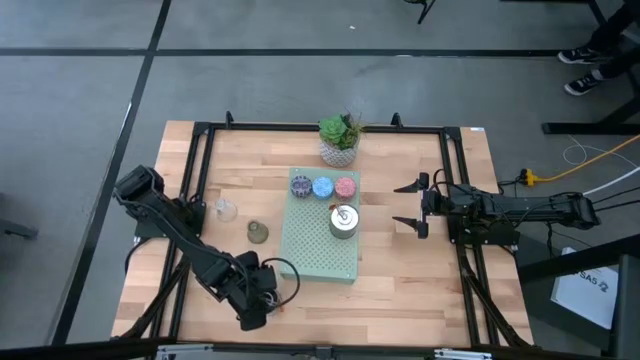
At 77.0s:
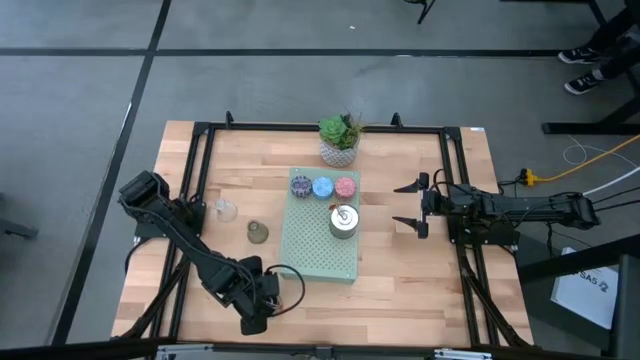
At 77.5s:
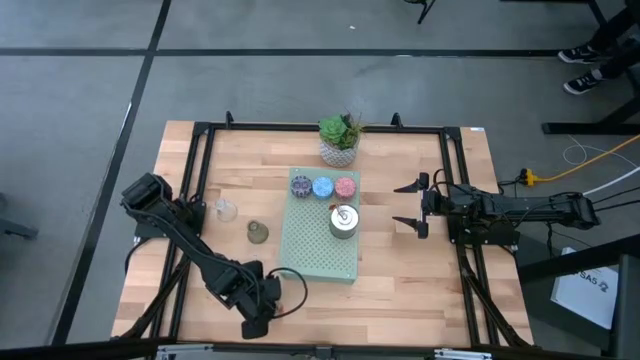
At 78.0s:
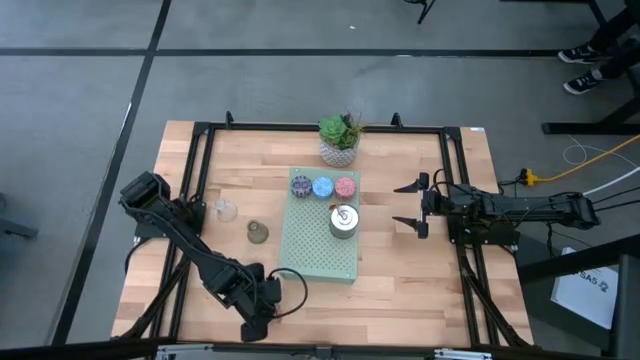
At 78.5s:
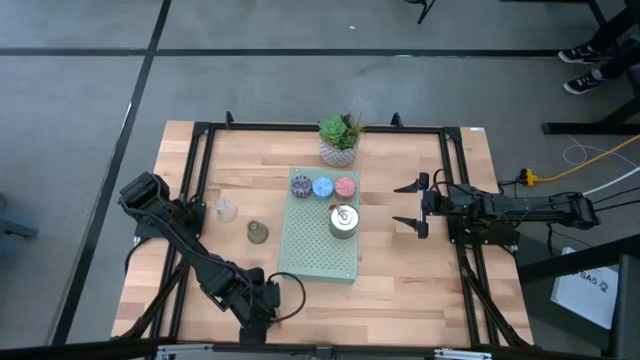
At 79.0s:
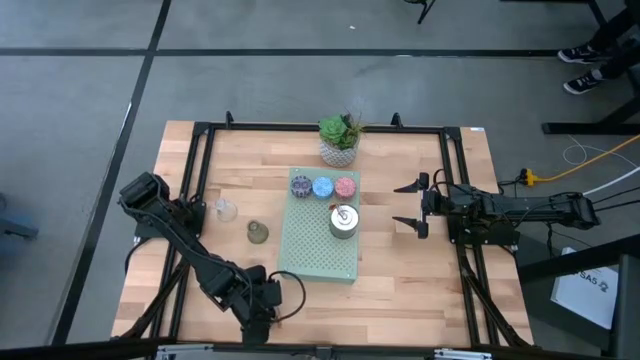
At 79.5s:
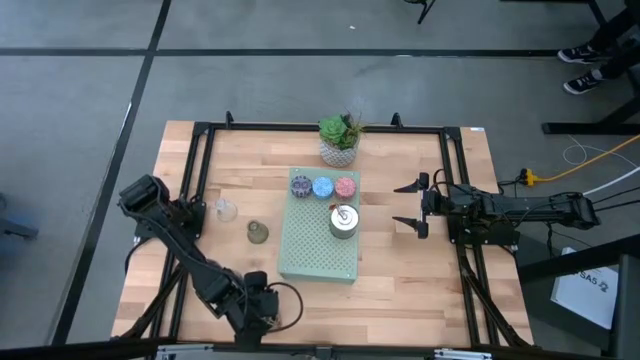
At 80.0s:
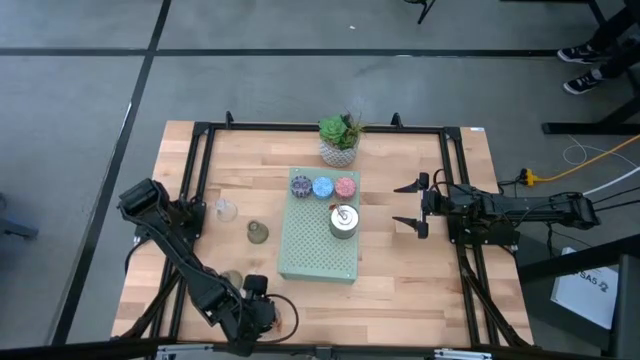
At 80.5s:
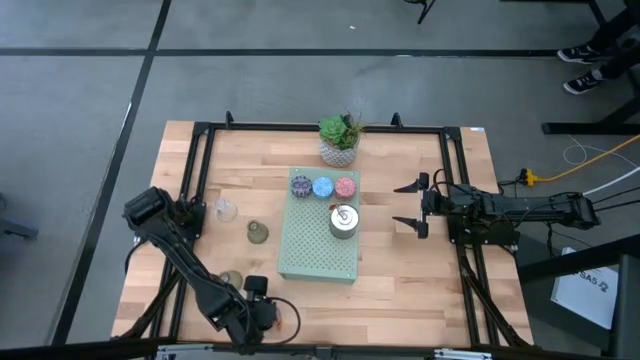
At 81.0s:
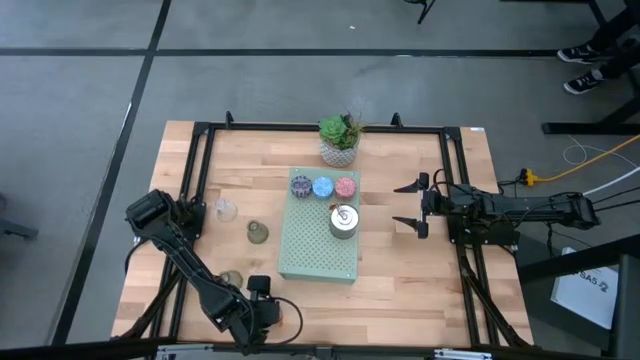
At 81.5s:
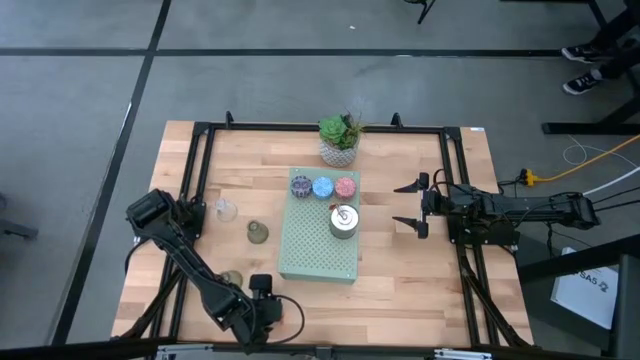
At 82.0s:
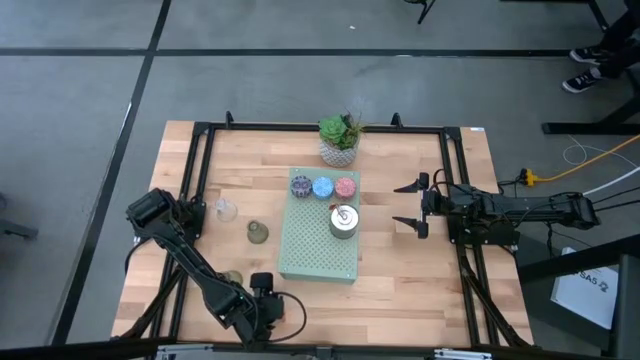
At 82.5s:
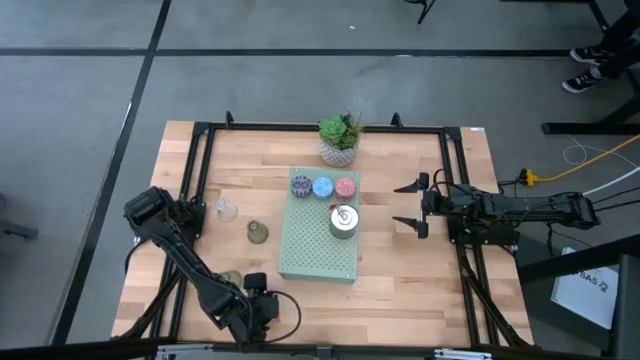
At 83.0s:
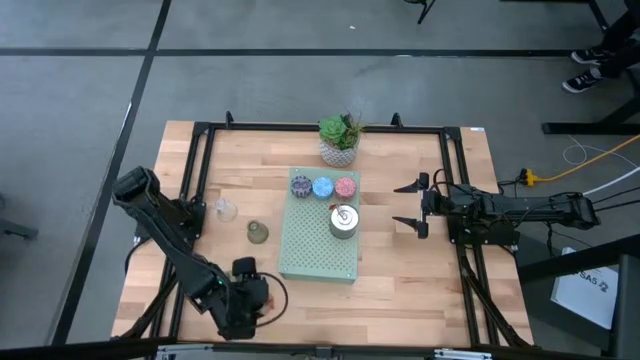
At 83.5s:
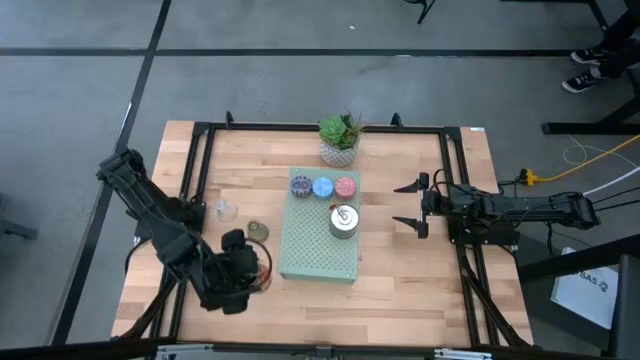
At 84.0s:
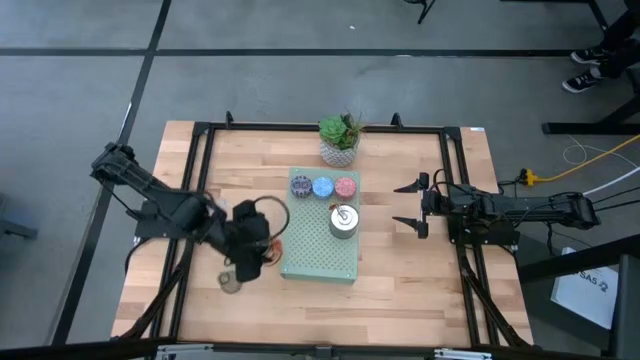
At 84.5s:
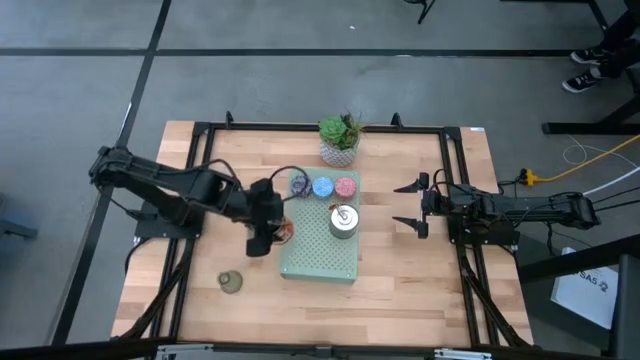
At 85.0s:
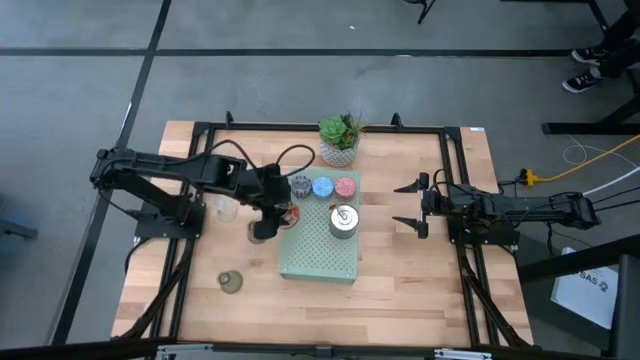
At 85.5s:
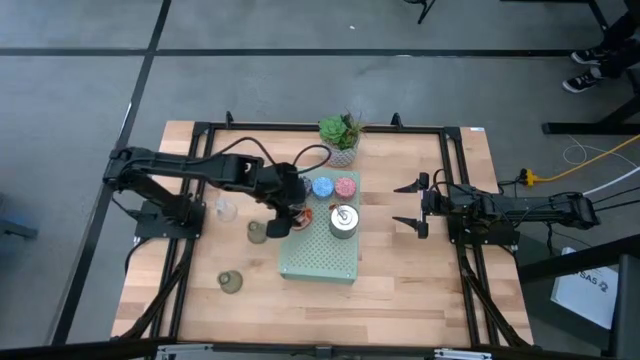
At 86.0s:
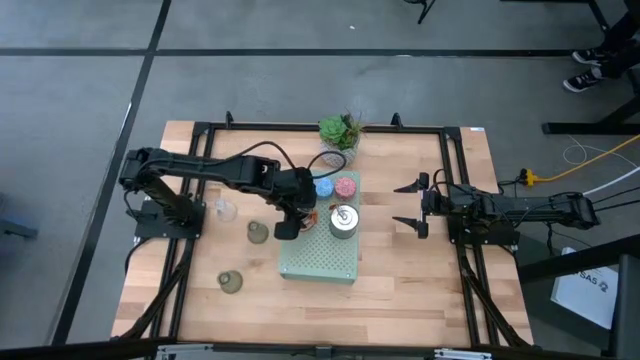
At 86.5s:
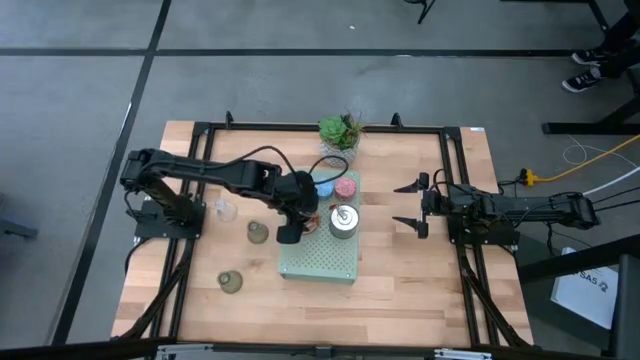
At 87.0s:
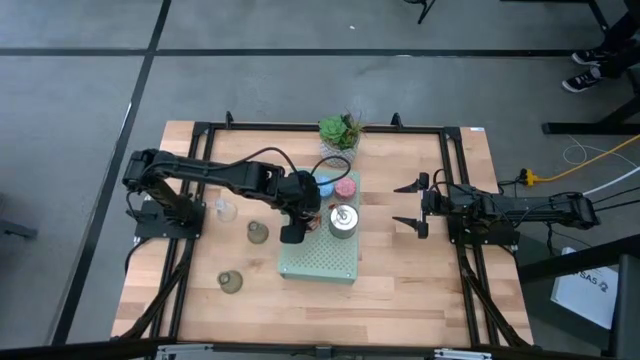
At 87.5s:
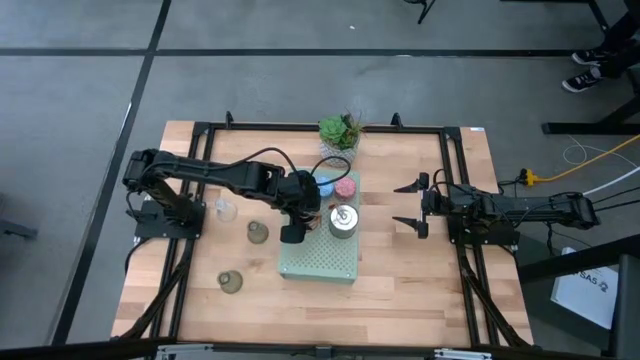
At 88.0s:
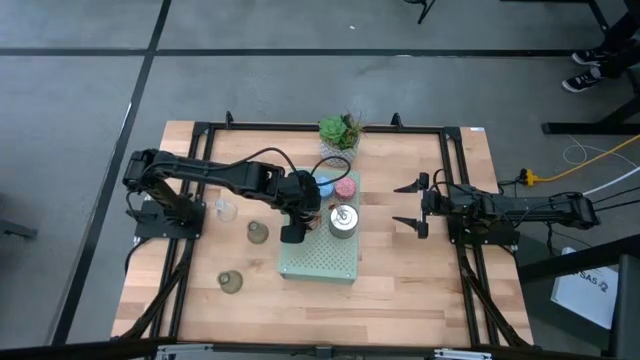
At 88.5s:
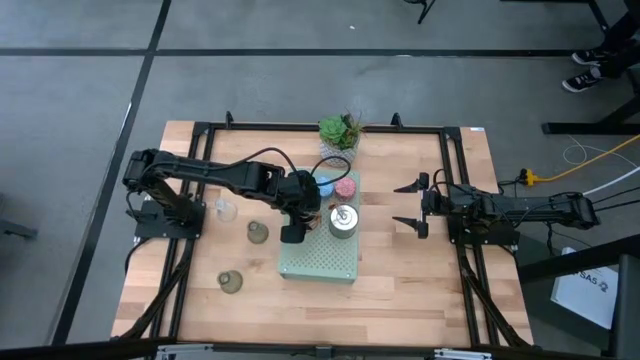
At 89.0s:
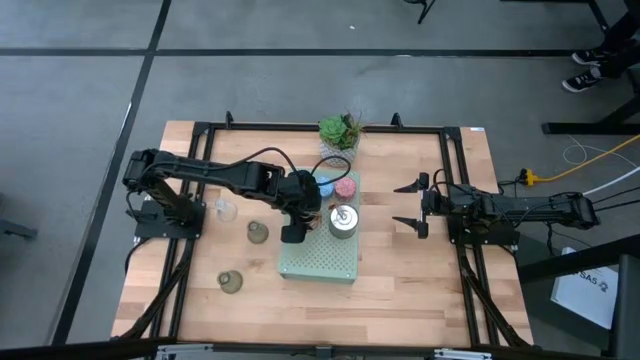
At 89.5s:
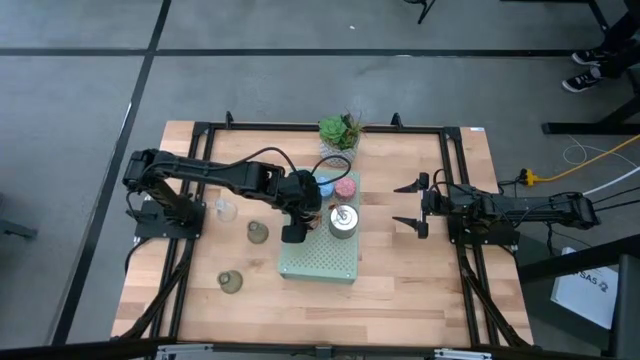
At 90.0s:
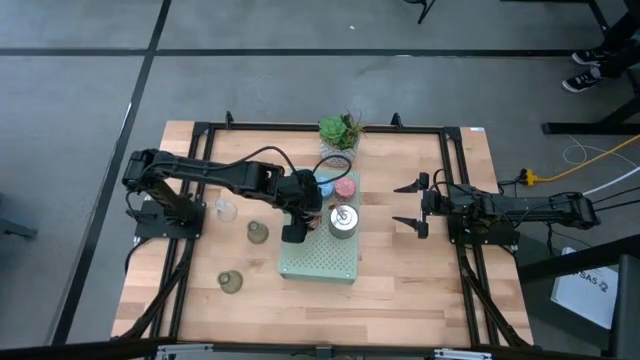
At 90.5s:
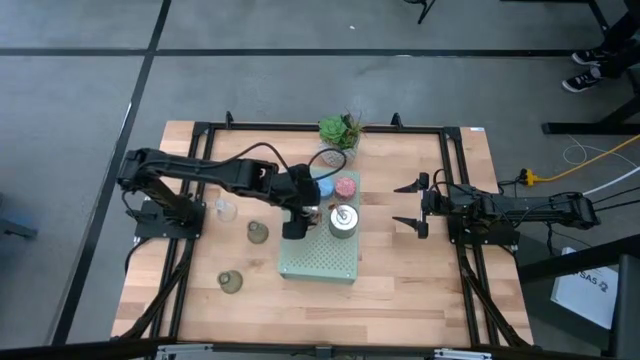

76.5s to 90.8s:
Task: Pick & Place candle stick holders
Put the silver scented candle on the shelf

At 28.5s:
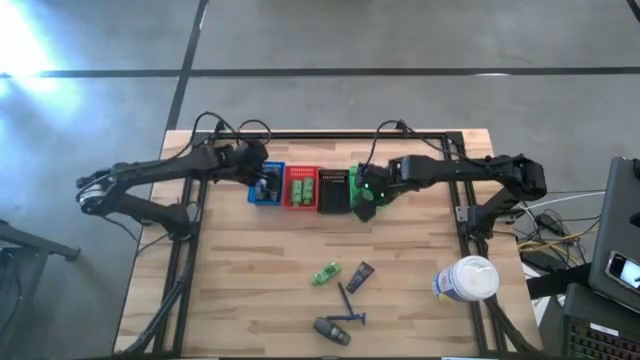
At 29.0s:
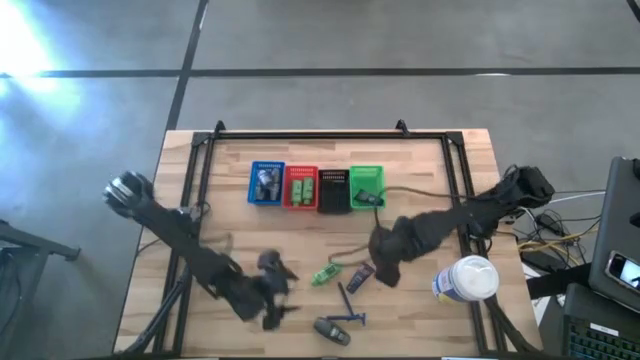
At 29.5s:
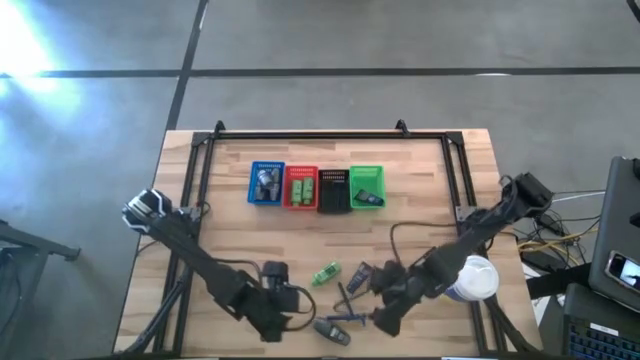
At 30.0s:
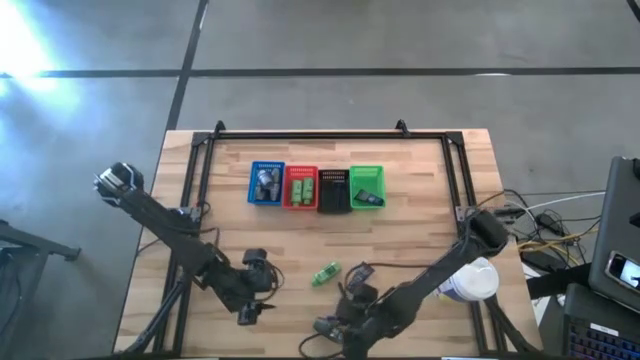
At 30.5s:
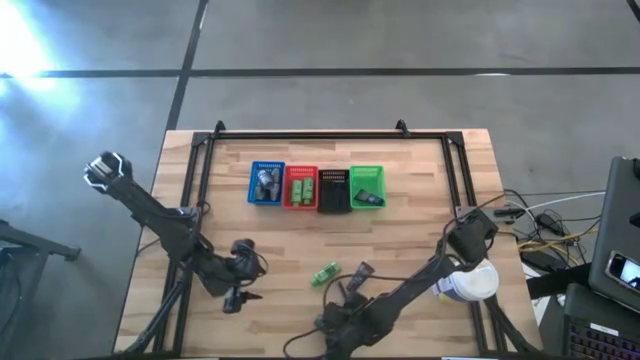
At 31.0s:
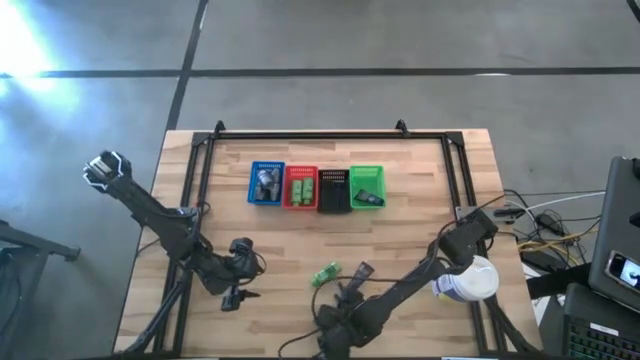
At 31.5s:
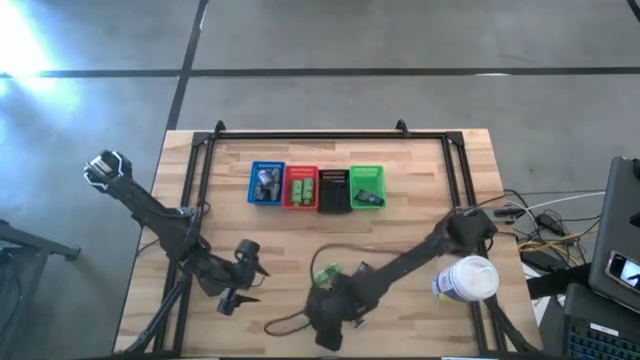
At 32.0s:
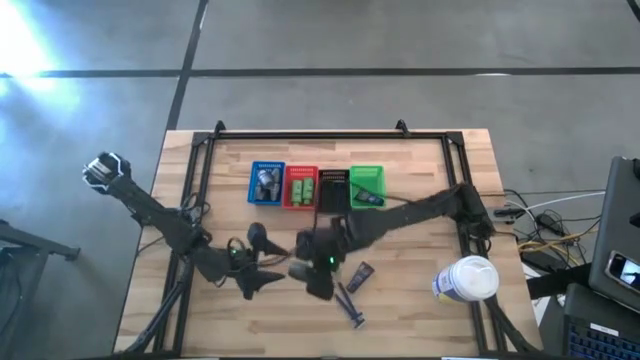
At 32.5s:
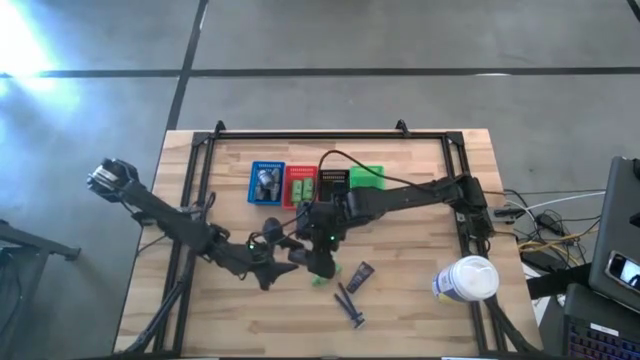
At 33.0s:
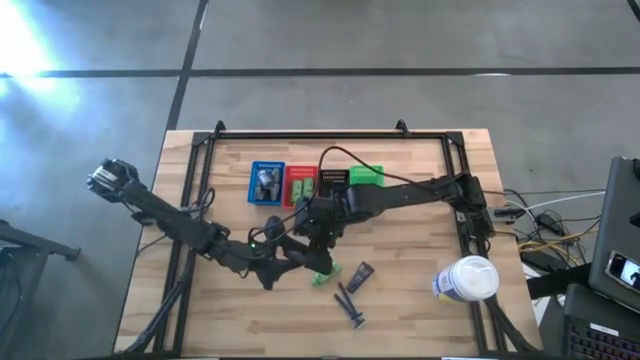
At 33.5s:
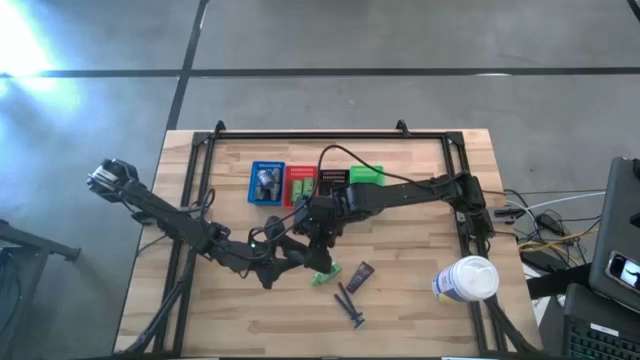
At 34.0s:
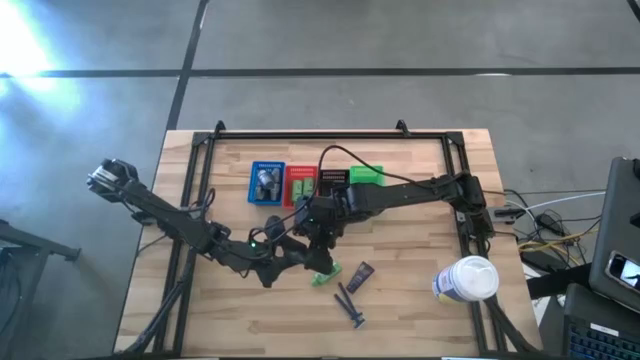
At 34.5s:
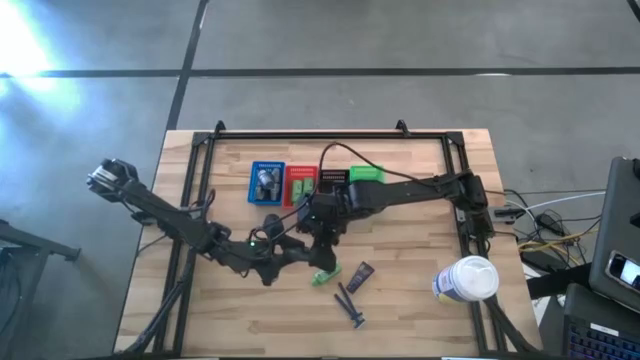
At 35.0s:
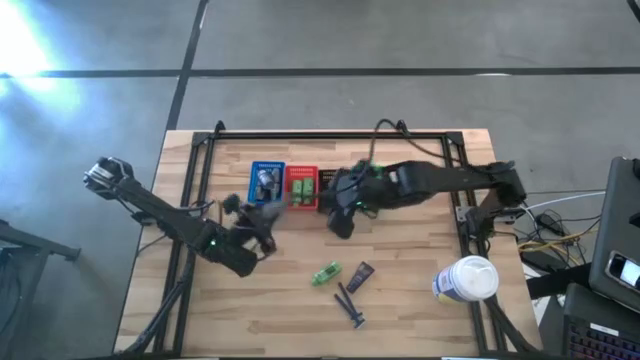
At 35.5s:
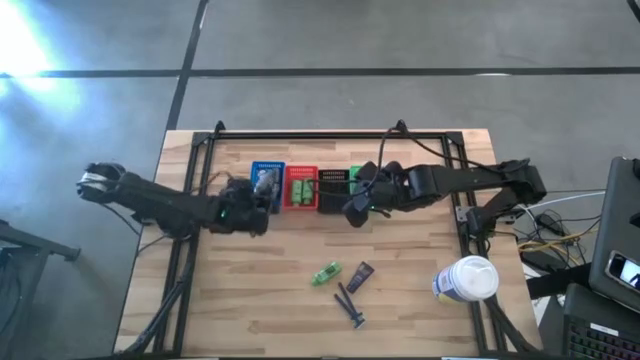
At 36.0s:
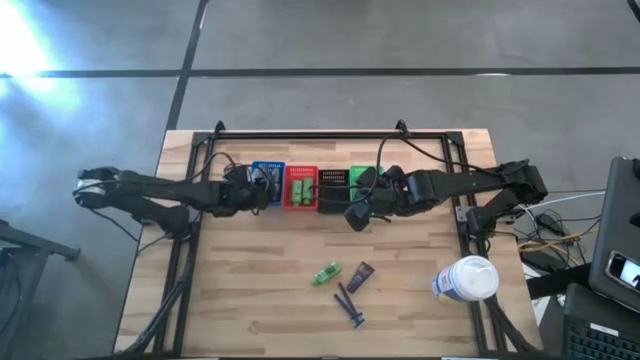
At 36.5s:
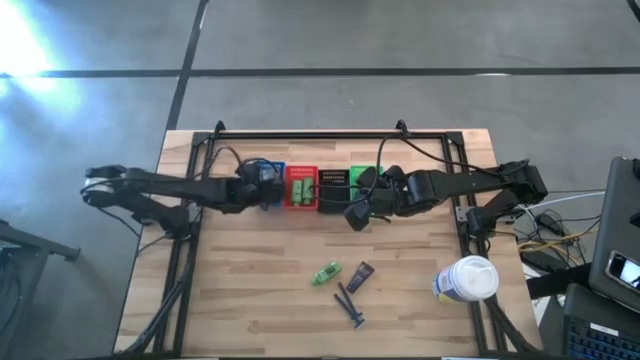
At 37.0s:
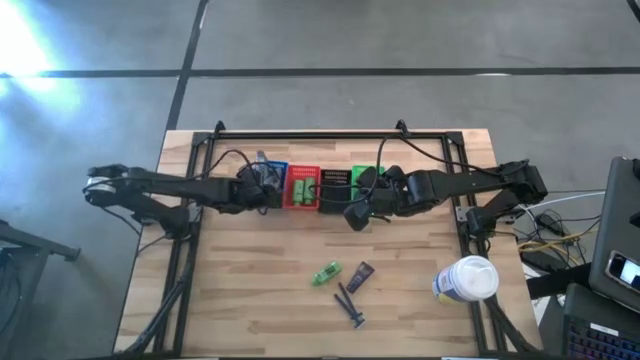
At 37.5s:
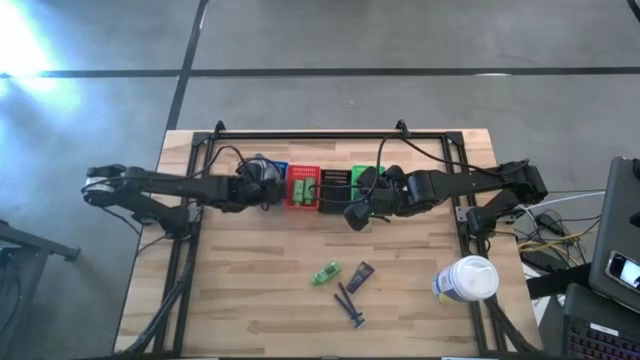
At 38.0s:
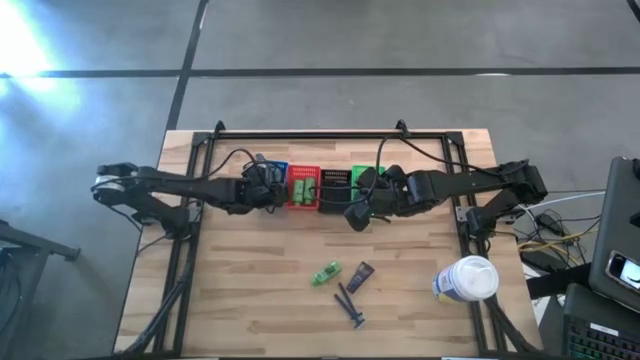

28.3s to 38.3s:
Task: Pick & Place Travel size toiletries
Put the deodorant into the blue basket
